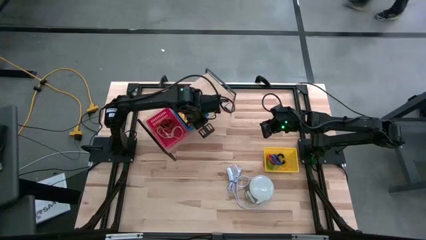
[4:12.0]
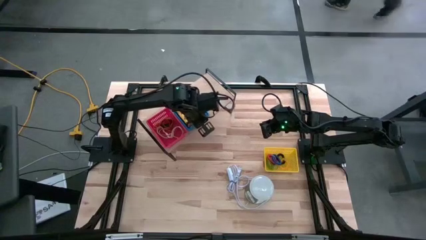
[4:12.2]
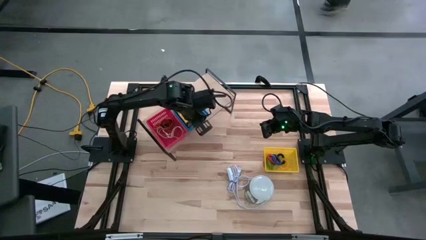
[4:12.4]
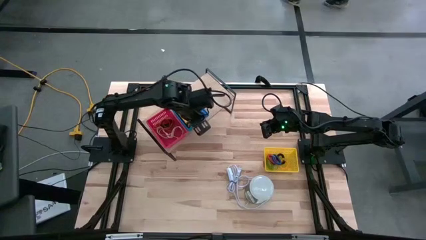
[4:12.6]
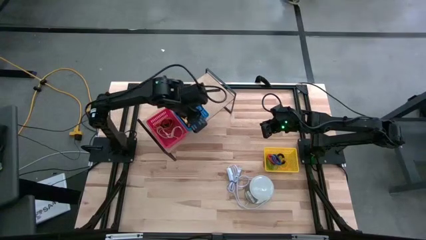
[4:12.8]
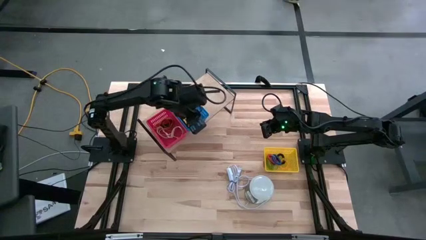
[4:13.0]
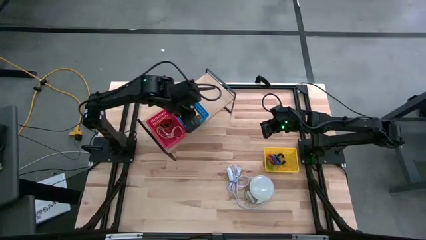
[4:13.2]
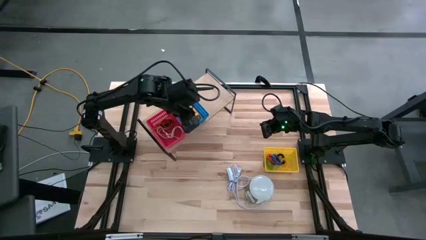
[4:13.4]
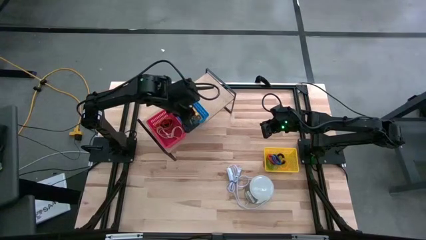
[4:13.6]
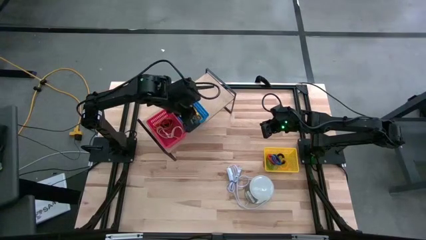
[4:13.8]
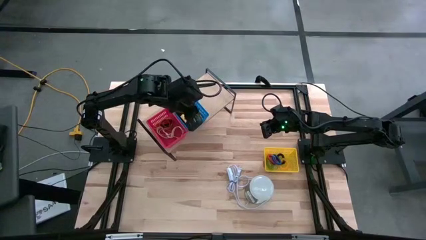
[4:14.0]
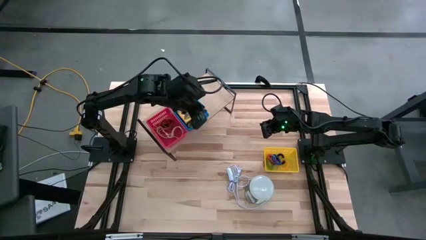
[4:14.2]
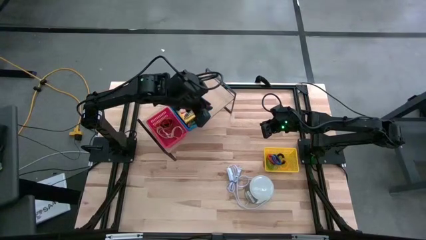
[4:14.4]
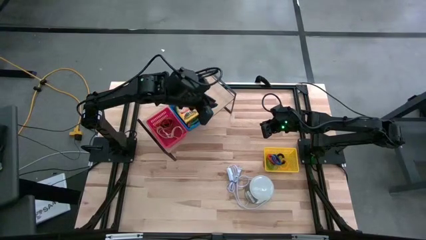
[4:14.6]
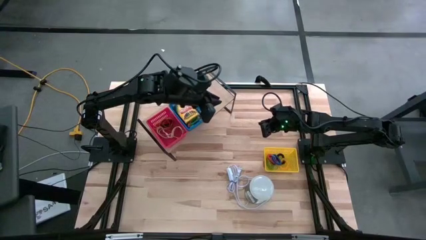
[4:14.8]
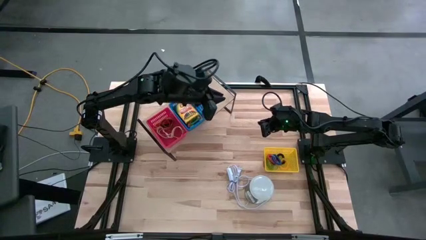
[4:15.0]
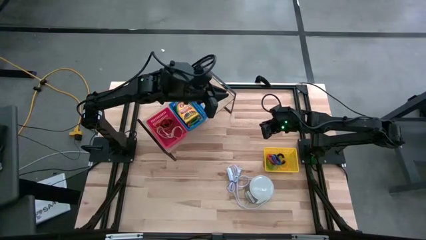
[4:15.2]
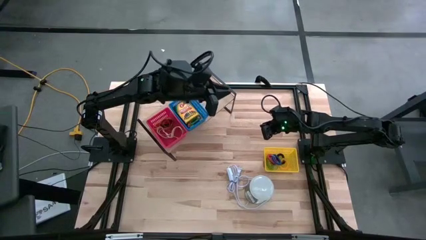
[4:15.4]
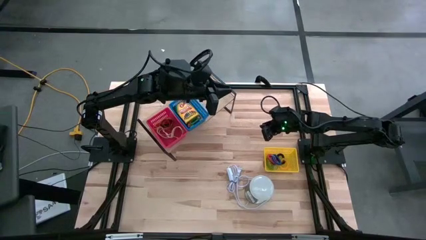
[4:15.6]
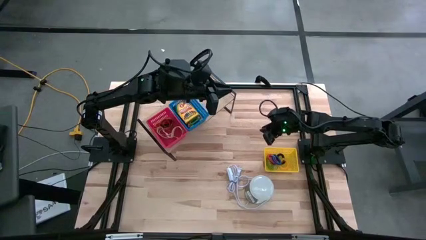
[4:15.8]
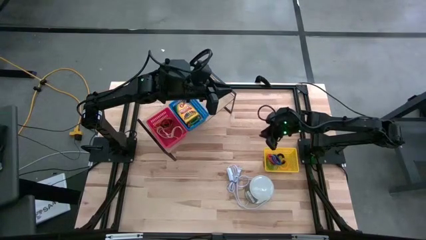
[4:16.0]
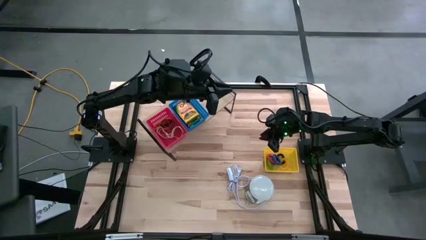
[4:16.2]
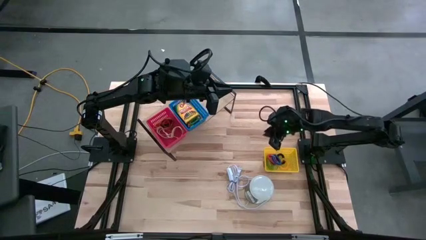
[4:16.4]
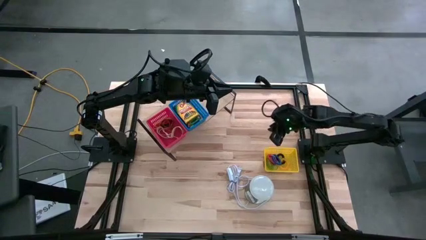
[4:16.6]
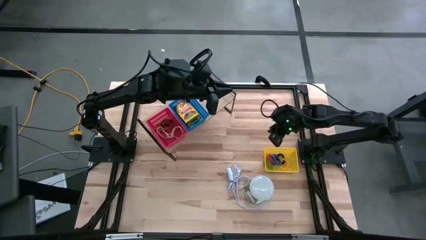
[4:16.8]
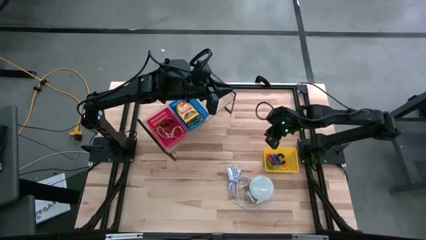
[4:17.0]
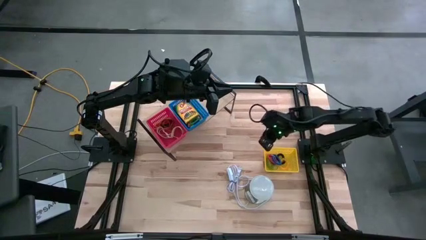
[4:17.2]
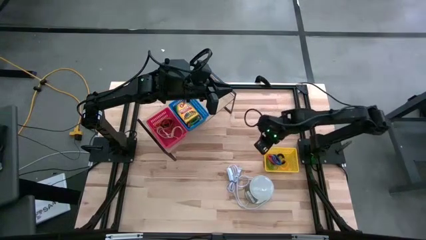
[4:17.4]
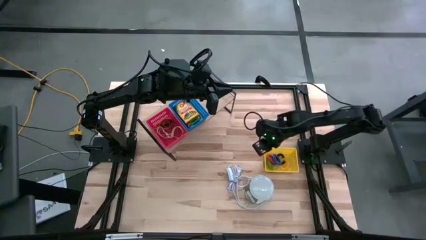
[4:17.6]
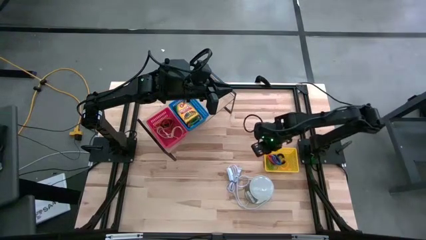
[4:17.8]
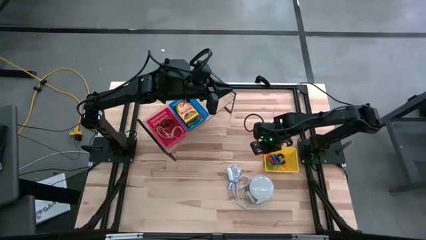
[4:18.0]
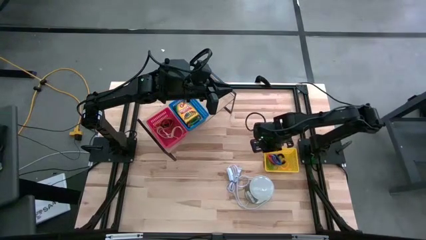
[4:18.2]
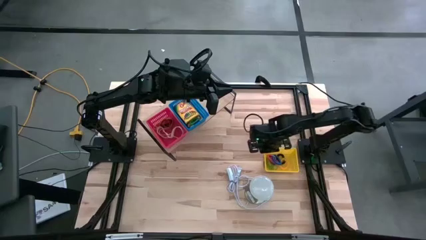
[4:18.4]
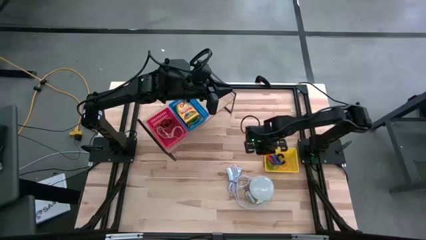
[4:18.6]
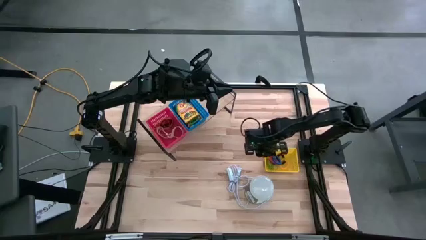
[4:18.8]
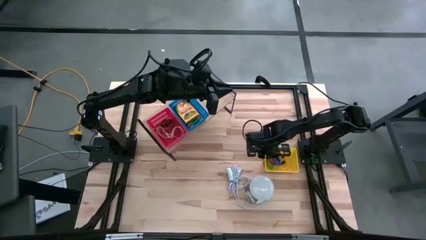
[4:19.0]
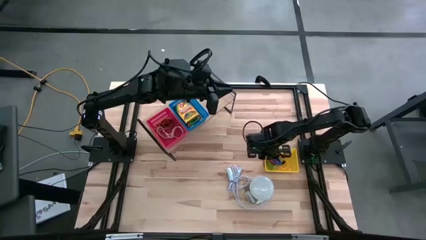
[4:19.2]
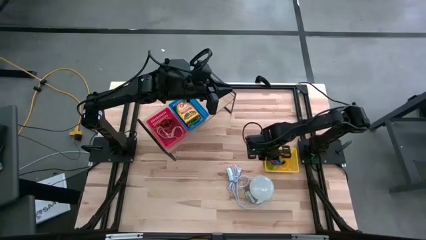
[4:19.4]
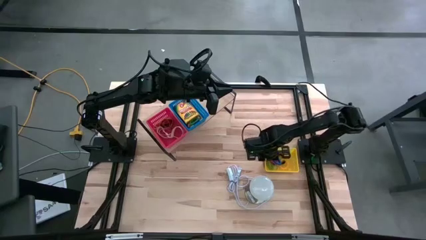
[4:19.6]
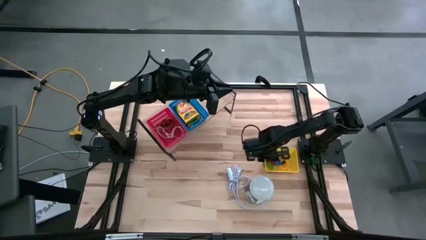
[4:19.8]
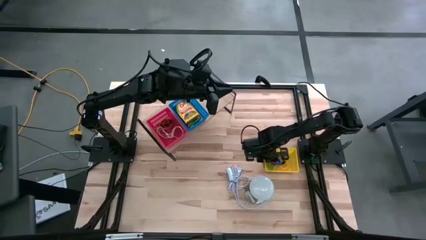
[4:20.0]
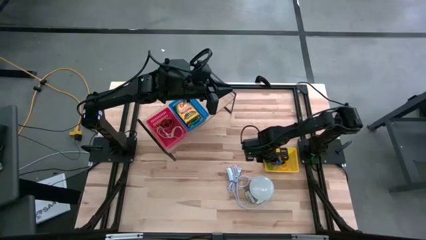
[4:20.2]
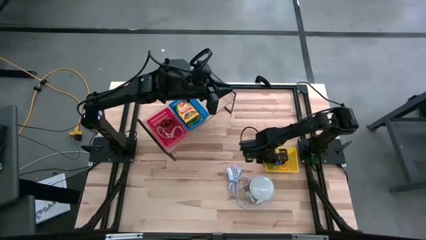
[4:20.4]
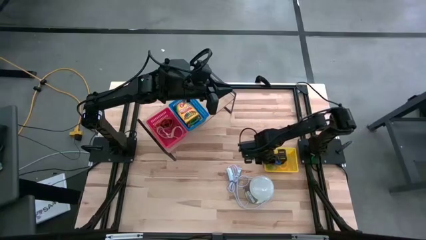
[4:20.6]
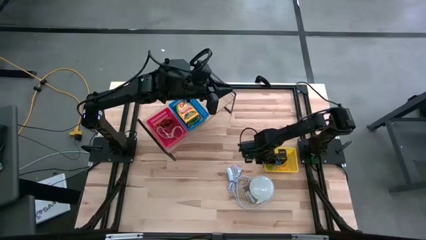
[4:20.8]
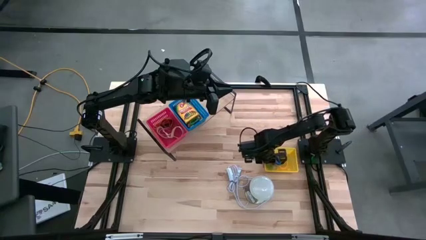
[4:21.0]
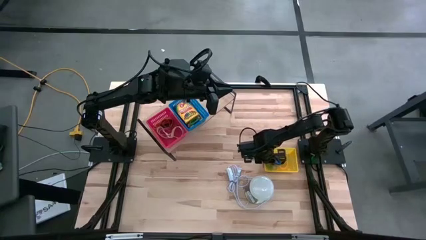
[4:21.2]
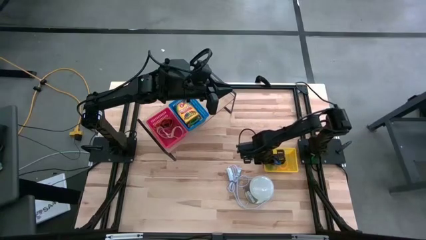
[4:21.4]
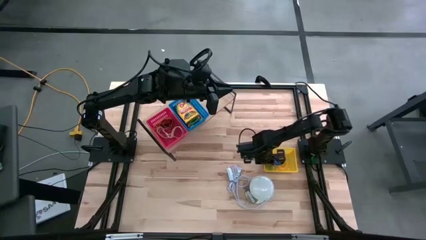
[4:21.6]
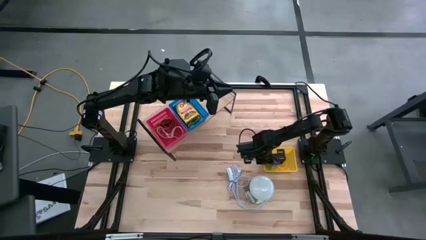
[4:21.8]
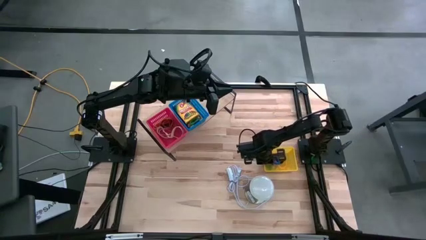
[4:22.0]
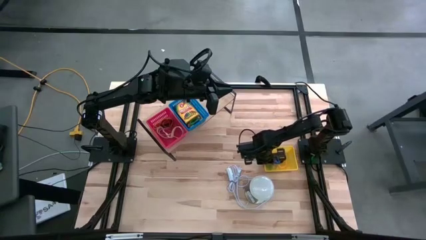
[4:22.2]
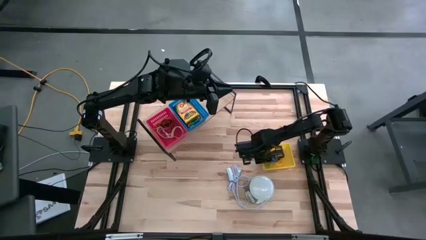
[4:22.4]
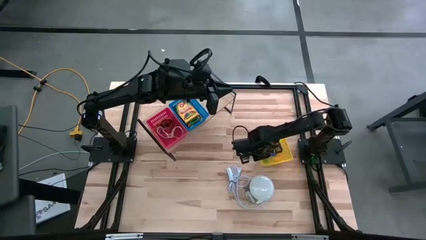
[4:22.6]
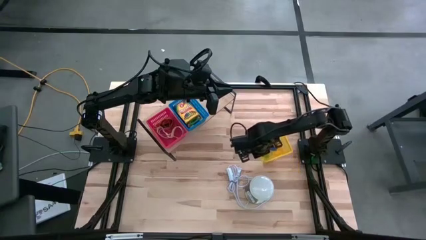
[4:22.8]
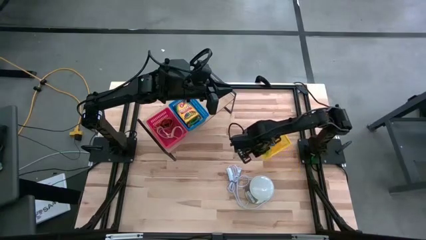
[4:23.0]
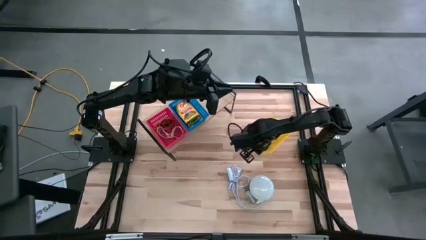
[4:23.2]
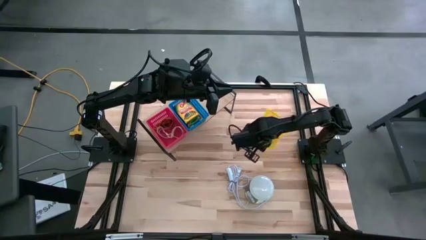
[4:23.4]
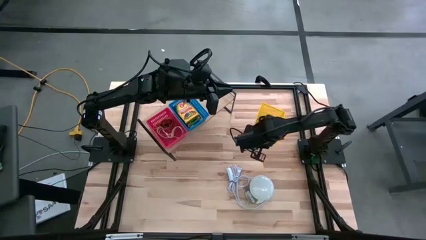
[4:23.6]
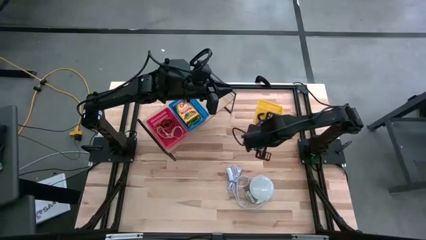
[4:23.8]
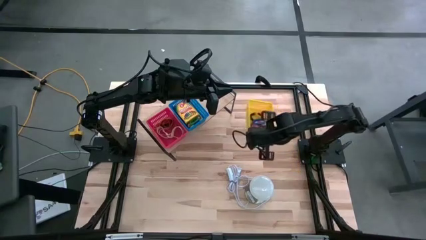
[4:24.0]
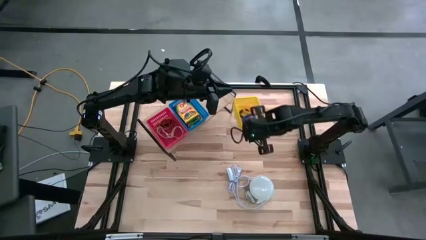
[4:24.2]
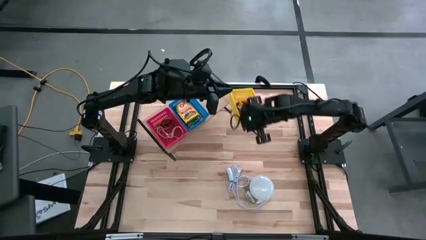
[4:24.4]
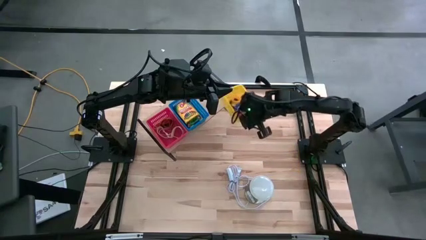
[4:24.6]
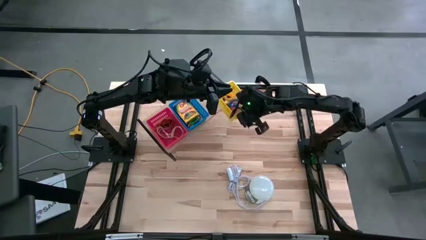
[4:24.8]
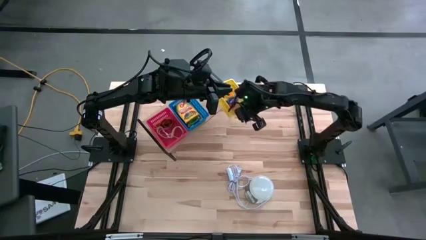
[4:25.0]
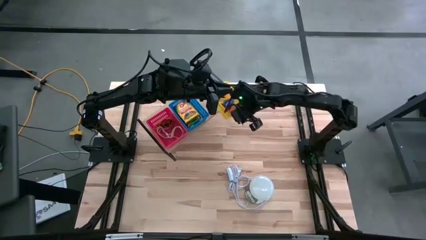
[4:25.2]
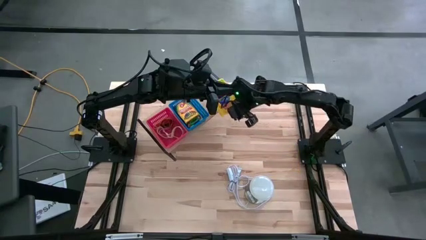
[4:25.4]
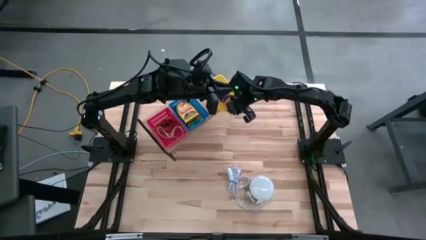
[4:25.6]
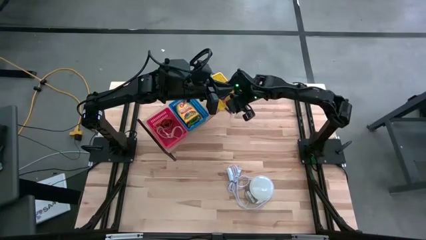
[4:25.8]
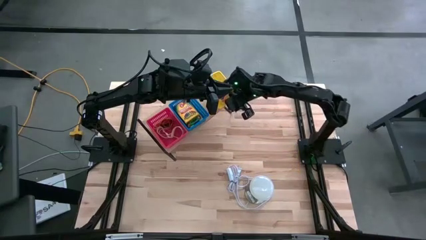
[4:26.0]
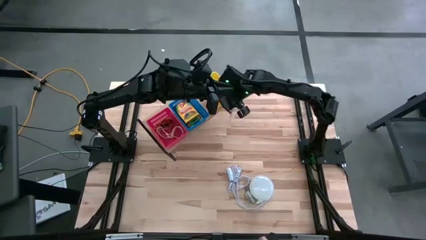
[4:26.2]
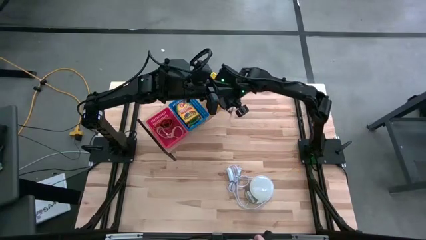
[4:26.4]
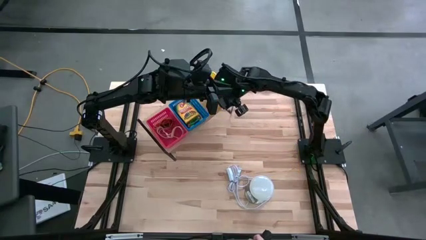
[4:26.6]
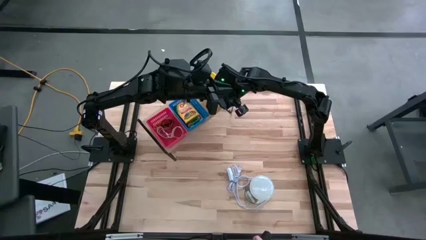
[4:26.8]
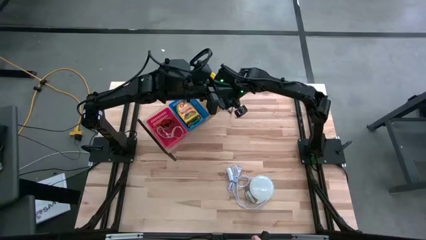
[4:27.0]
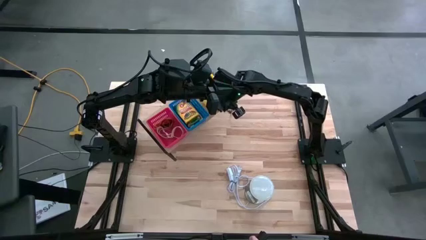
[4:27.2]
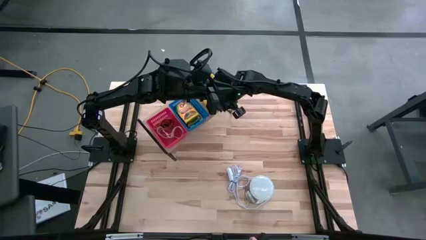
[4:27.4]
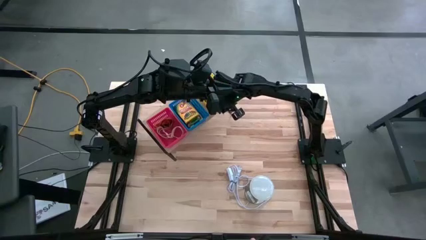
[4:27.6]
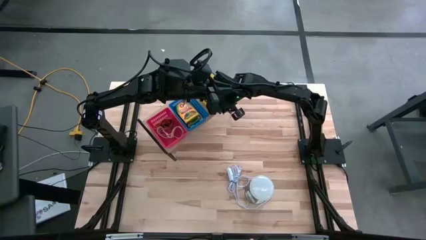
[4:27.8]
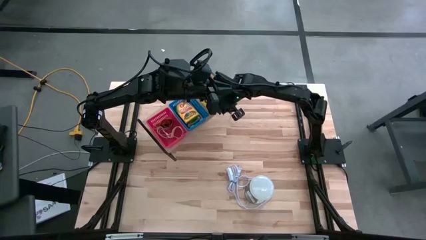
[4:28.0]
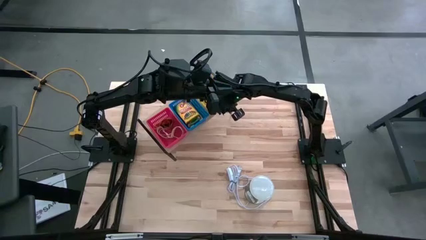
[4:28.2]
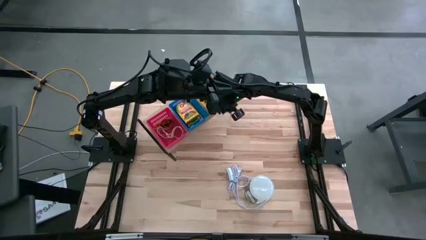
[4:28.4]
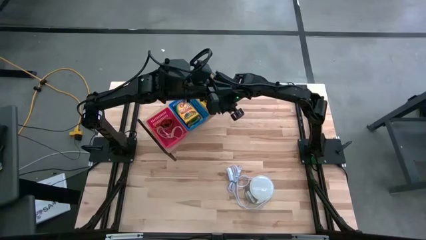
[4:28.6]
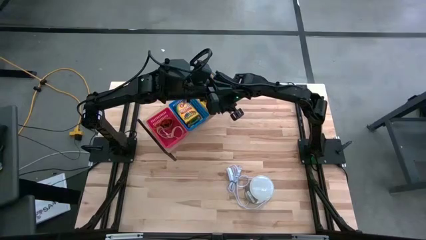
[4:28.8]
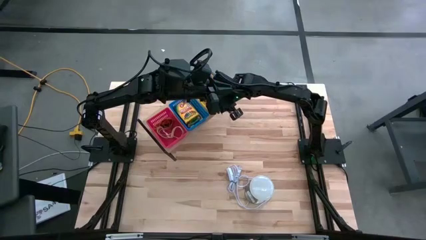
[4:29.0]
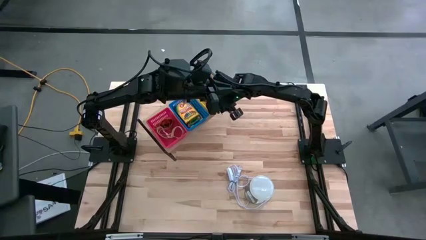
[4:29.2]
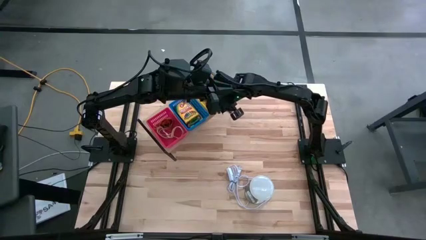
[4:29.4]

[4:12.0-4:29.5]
Task: Pick & Place Office Desk Supplies
Put the yellow bin with the spring keychains on the shelf
